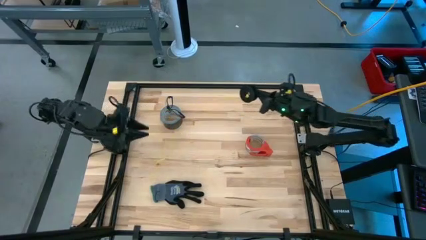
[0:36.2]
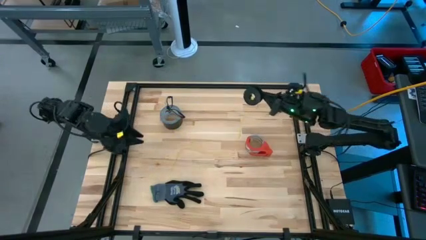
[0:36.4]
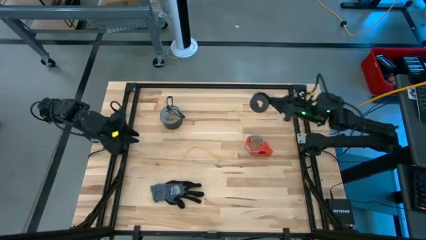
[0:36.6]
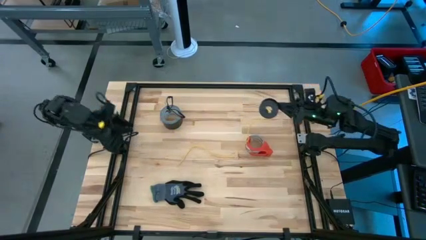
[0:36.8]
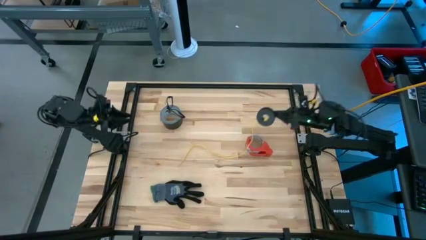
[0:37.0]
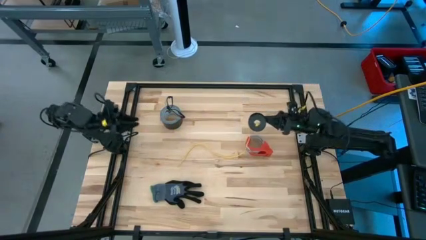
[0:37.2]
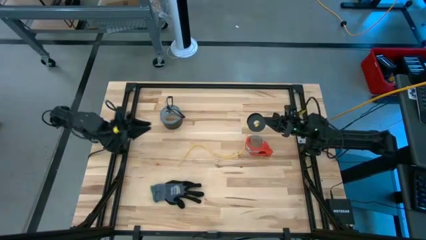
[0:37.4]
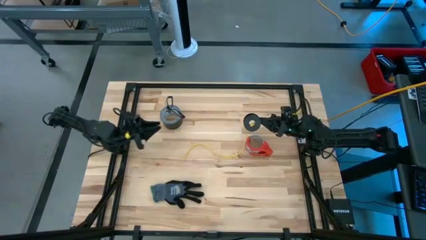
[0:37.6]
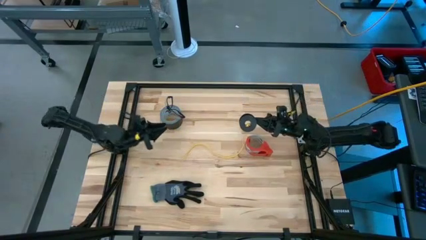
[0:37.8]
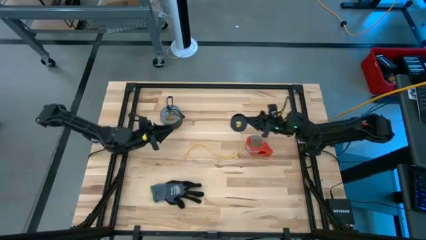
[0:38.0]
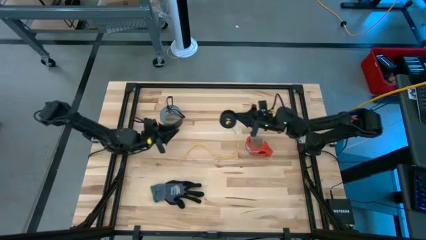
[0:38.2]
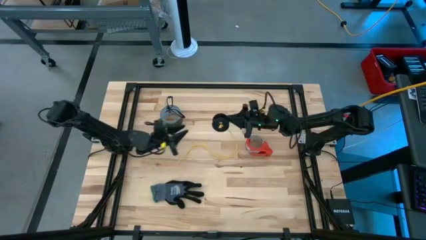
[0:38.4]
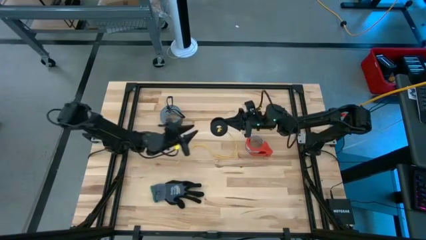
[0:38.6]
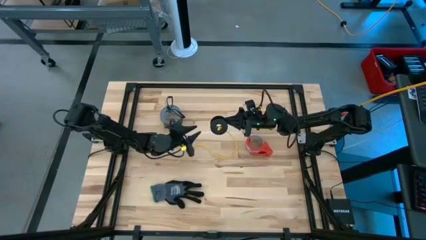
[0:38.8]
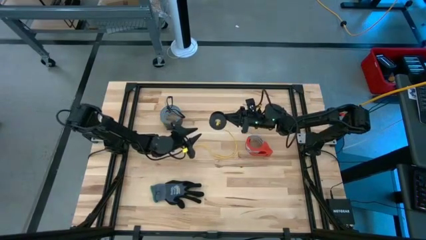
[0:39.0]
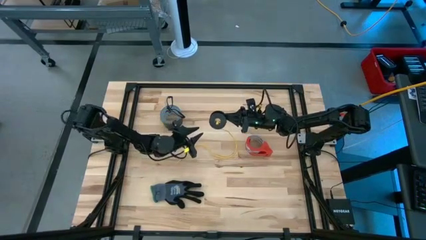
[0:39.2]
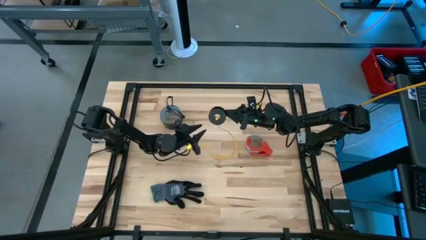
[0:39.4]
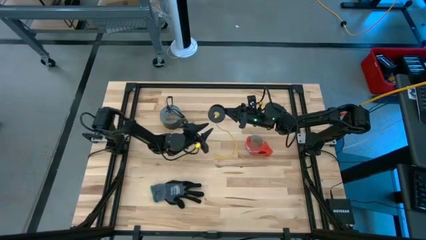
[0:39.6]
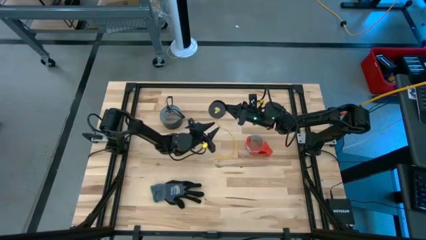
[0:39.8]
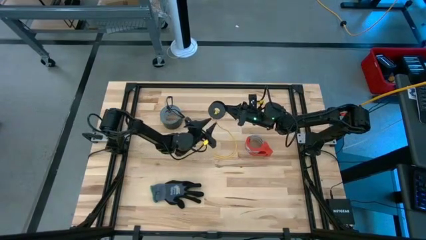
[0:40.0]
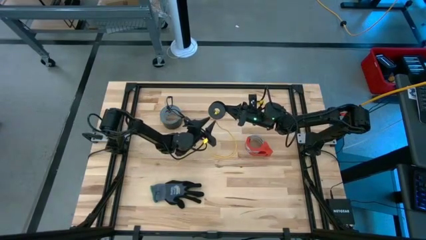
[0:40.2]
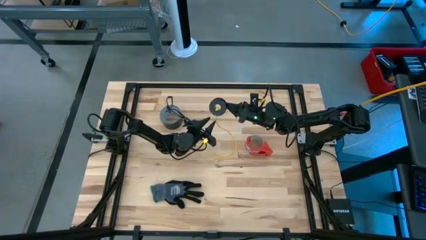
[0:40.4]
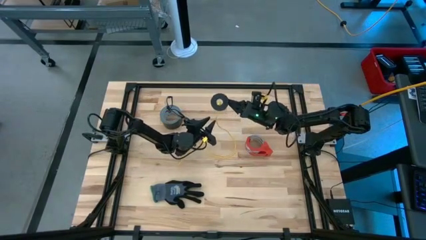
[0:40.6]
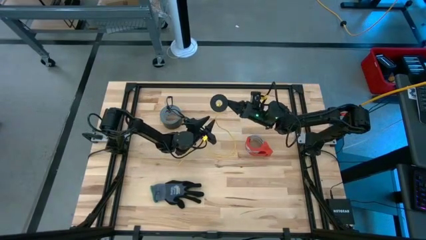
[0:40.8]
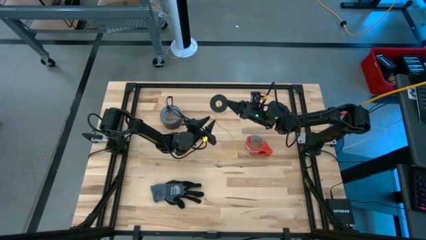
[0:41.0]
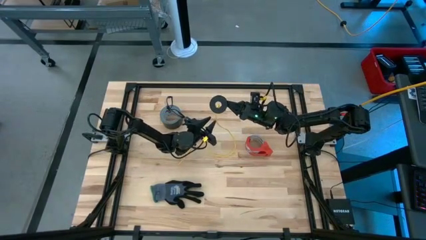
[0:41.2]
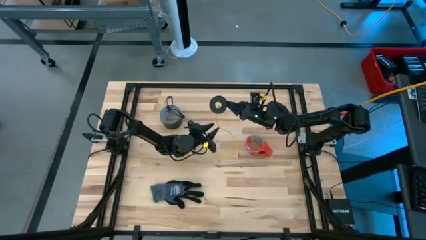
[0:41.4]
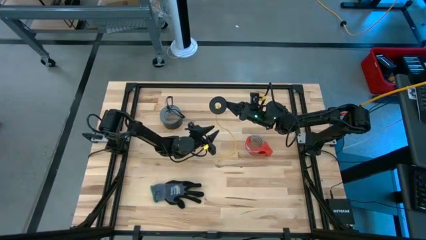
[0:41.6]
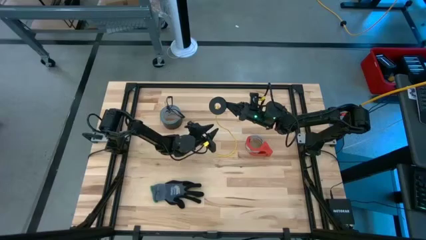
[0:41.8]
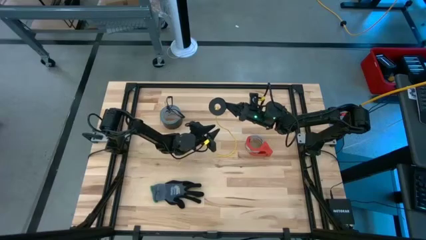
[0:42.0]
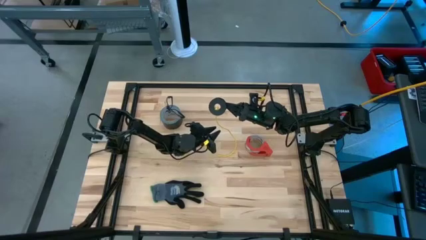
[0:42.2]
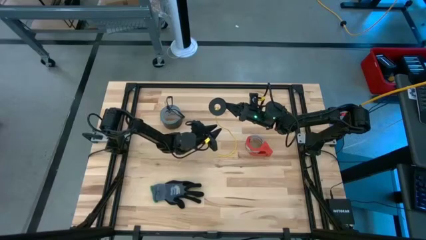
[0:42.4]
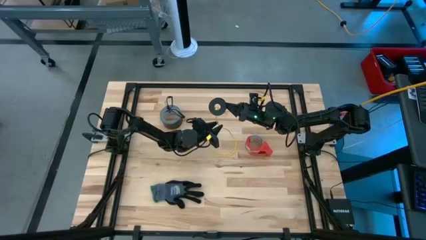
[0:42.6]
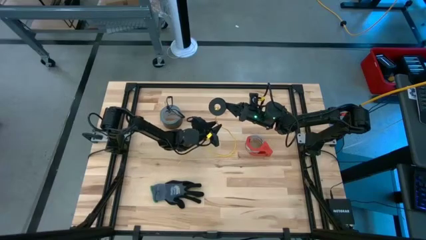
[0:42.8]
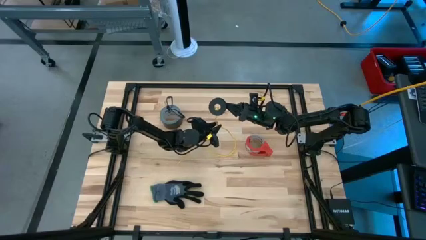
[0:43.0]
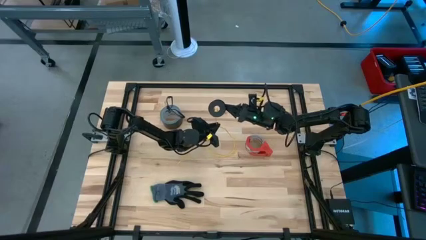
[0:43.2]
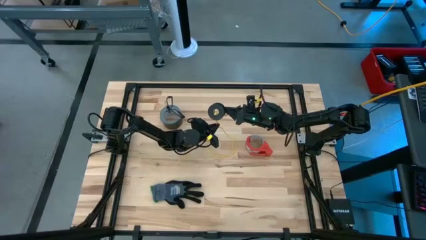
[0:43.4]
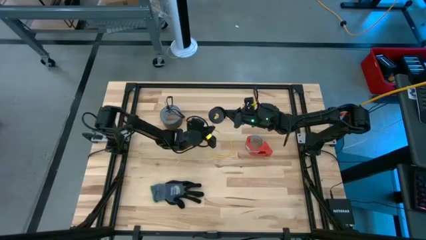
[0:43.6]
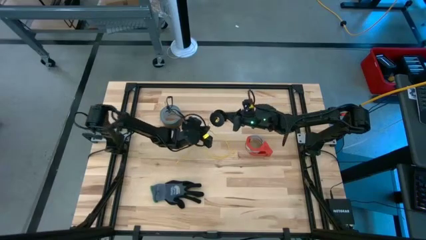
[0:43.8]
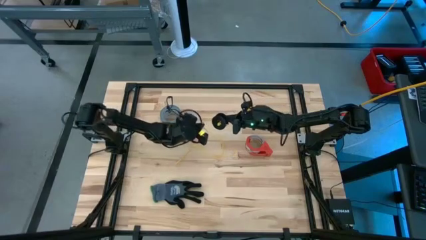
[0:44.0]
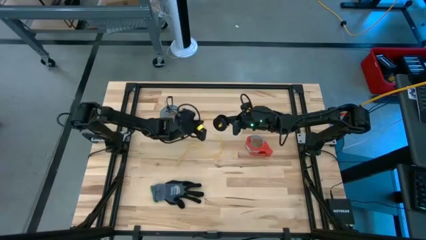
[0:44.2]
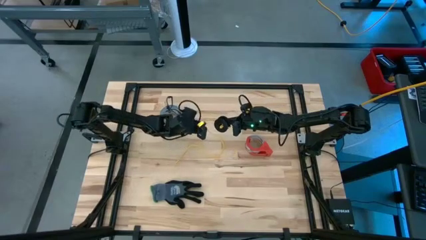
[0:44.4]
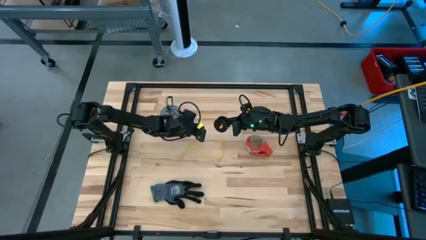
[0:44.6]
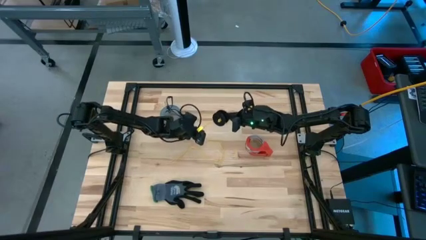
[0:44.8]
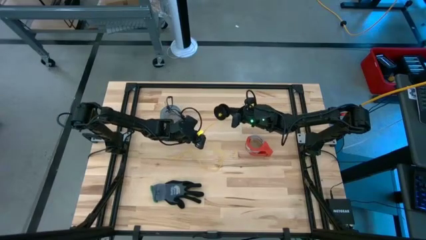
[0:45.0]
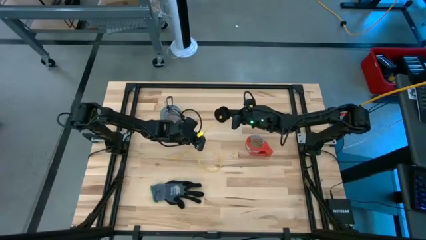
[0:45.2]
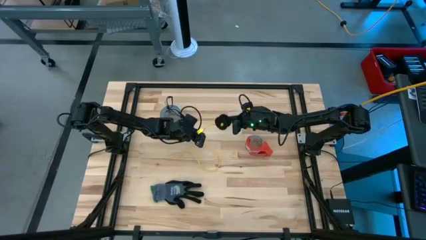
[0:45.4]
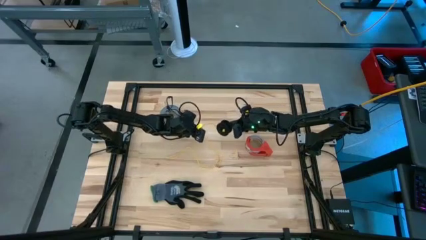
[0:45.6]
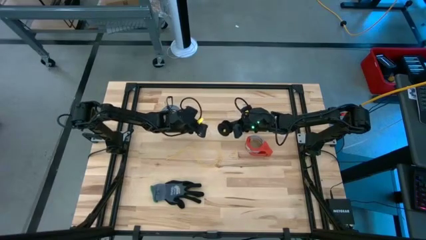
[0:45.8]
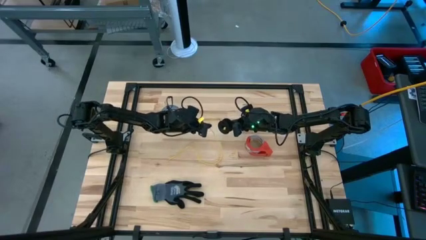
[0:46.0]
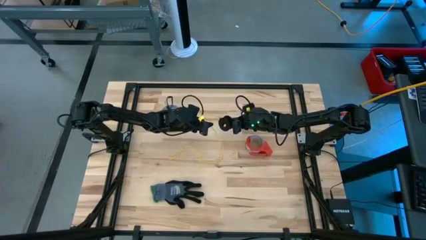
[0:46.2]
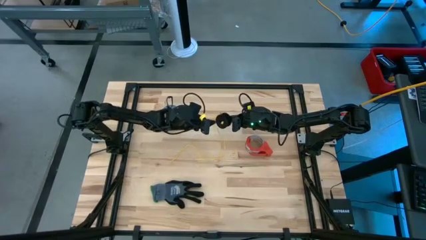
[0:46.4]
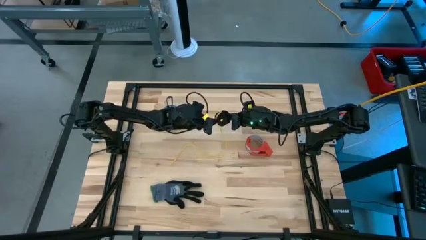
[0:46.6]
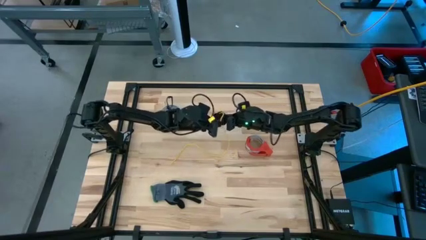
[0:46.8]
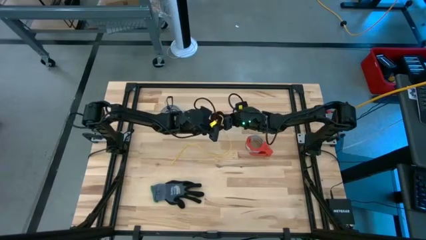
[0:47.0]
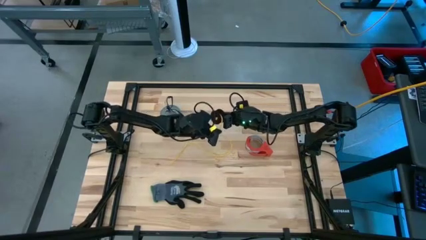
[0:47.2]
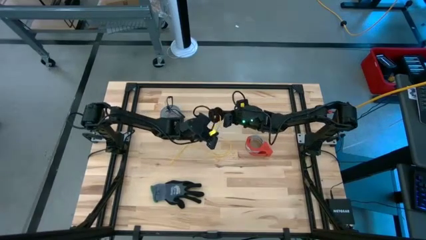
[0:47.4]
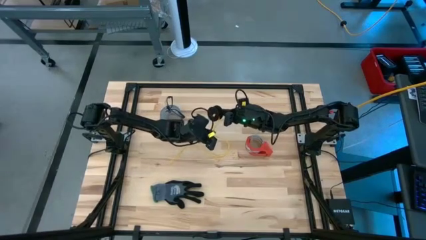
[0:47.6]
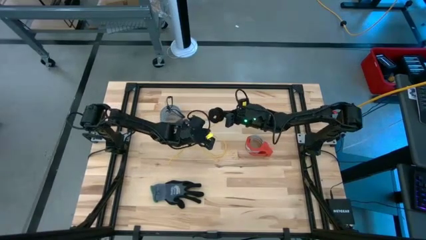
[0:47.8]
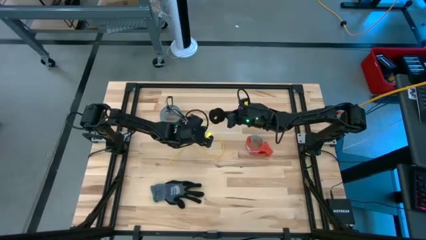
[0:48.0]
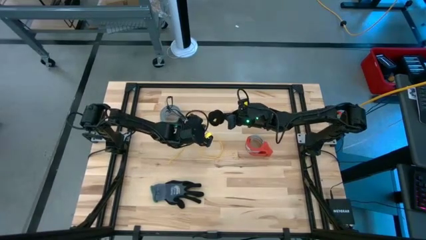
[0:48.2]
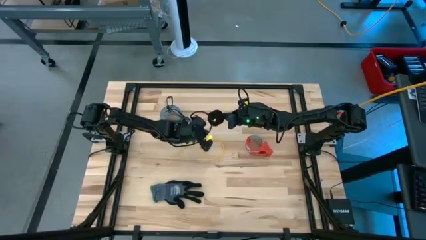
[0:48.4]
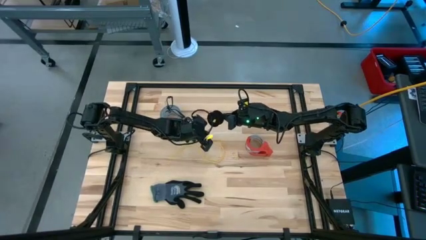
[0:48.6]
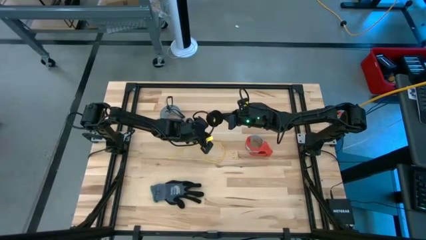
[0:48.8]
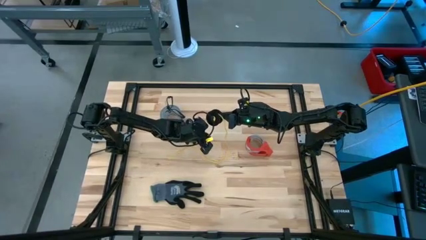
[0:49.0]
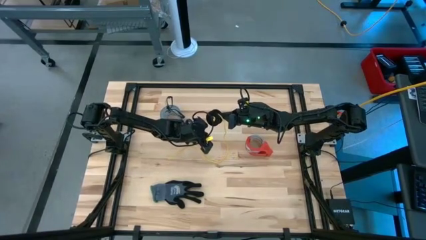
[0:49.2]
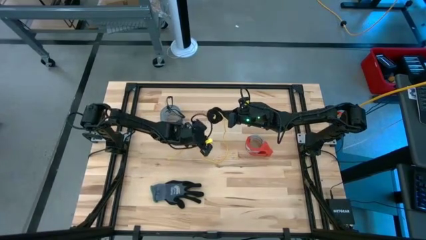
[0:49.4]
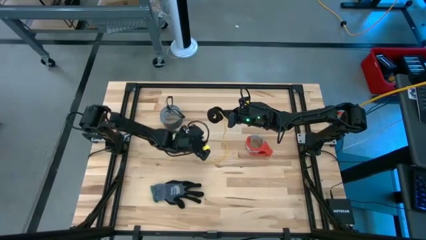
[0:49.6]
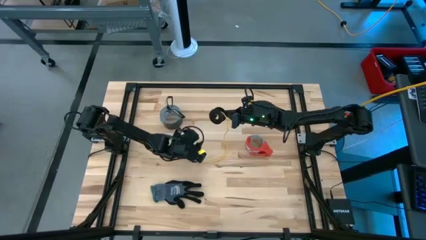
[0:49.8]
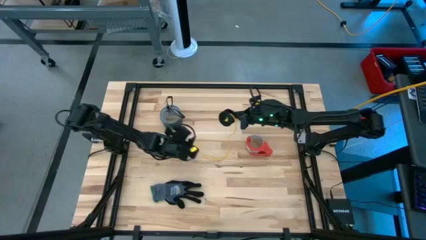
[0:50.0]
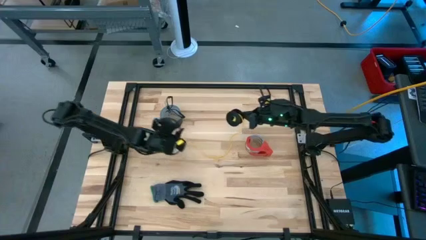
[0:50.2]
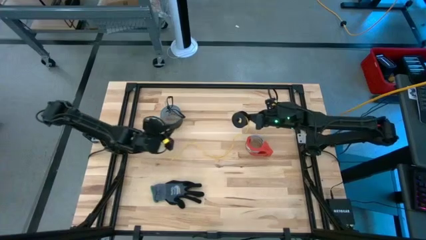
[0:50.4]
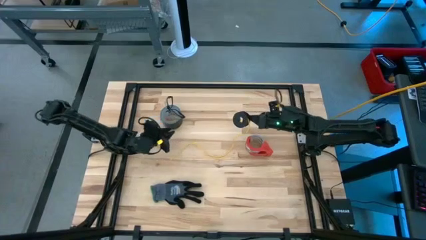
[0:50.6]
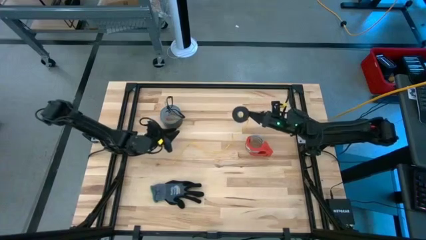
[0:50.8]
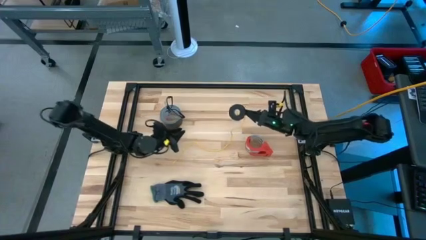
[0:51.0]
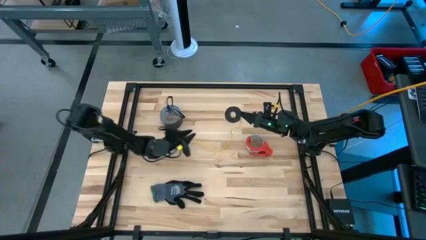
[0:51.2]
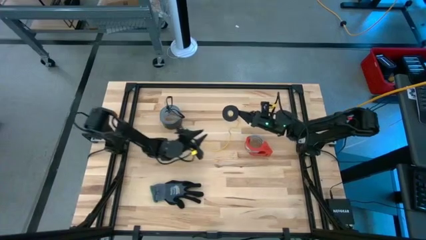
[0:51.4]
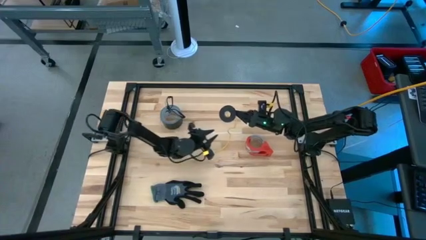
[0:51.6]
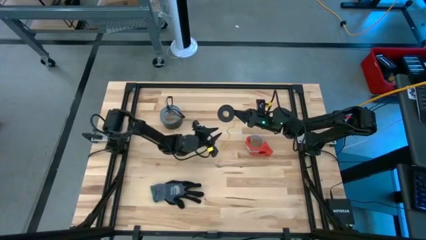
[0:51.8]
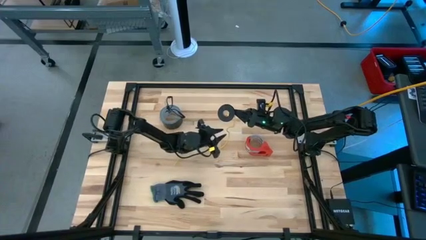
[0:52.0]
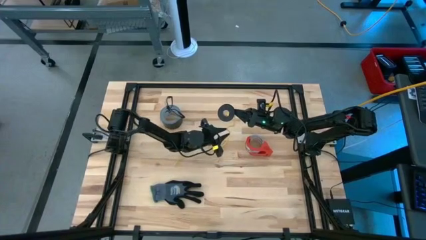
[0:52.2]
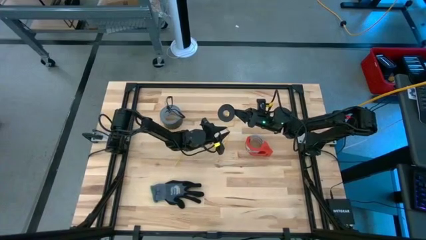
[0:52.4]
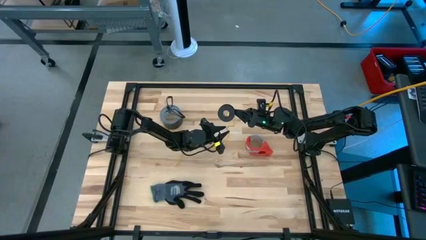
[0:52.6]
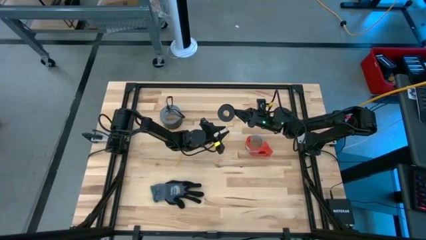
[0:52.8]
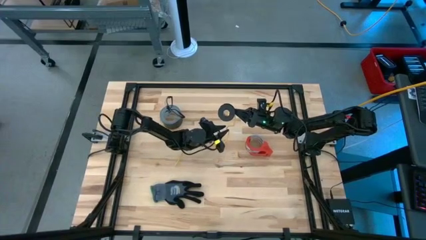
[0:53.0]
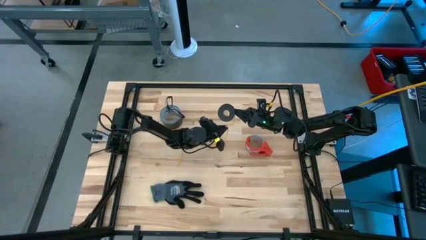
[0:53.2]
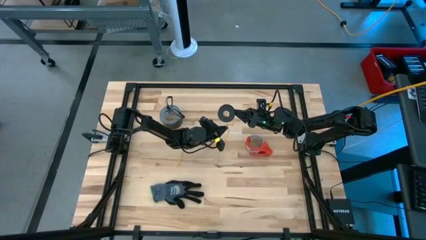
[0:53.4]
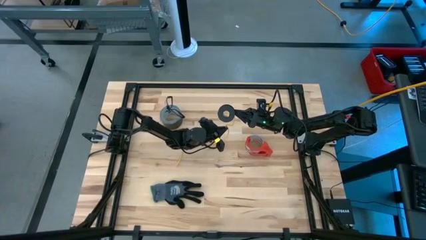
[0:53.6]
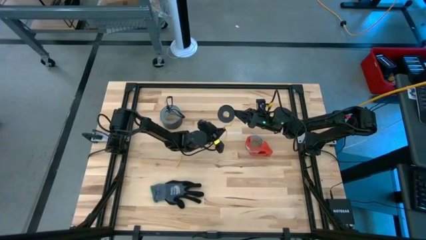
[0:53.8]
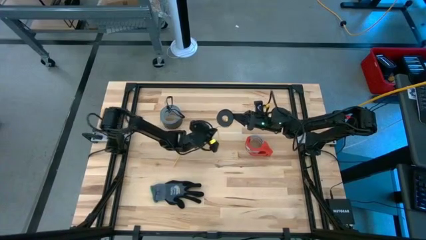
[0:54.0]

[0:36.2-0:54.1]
Task: Coil cords
Coil the yellow wire onto the spool
